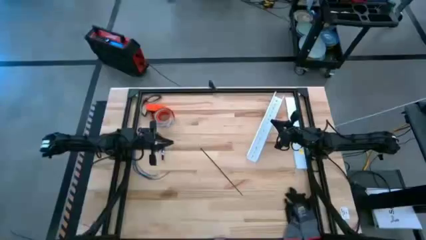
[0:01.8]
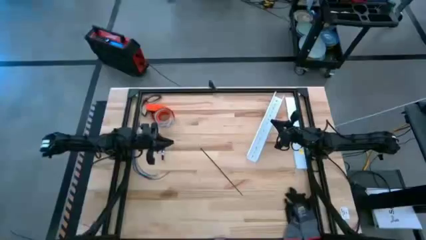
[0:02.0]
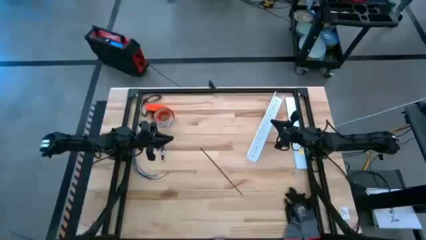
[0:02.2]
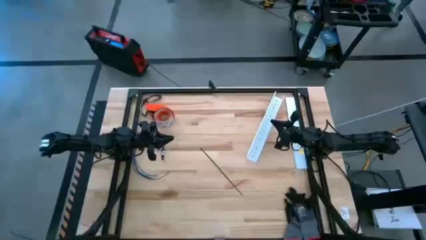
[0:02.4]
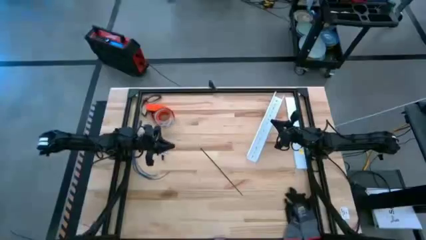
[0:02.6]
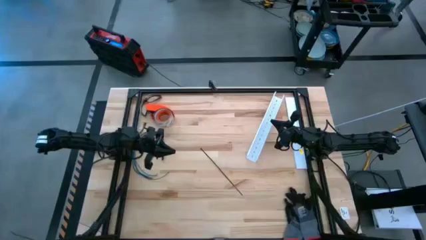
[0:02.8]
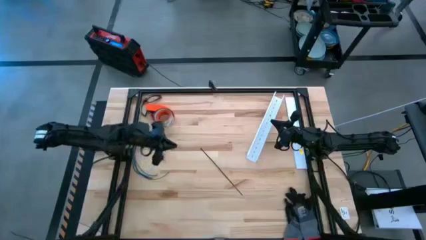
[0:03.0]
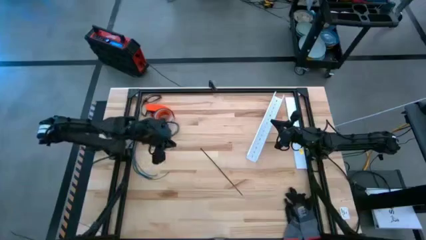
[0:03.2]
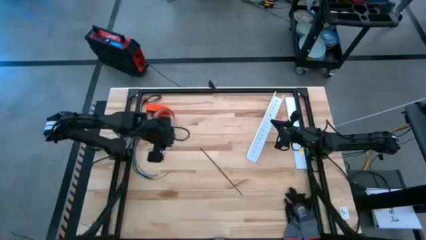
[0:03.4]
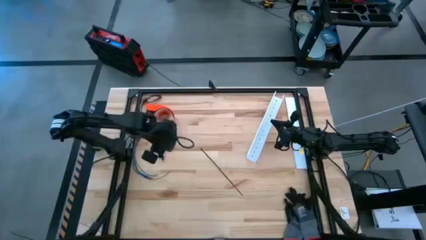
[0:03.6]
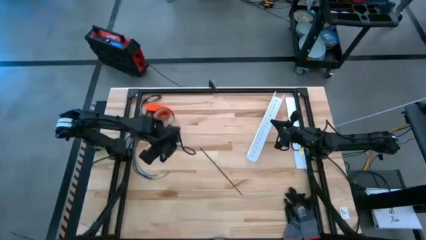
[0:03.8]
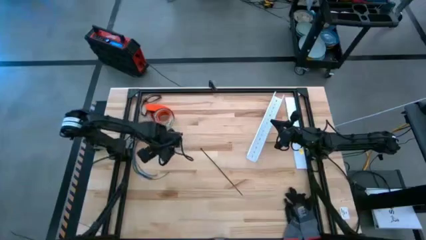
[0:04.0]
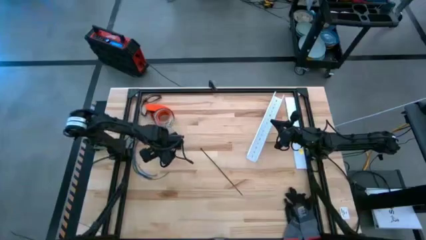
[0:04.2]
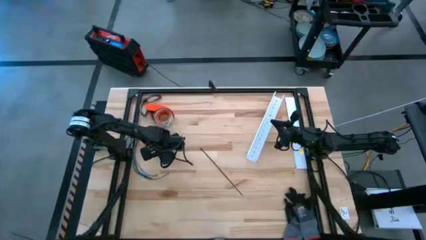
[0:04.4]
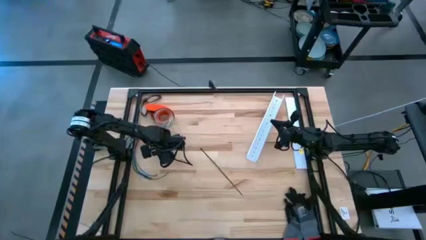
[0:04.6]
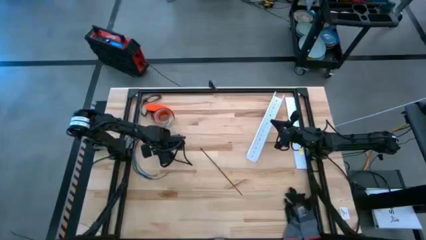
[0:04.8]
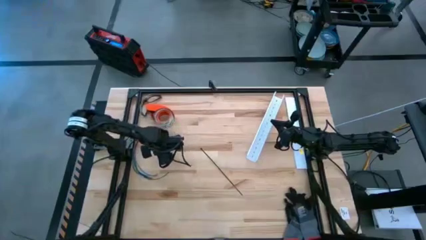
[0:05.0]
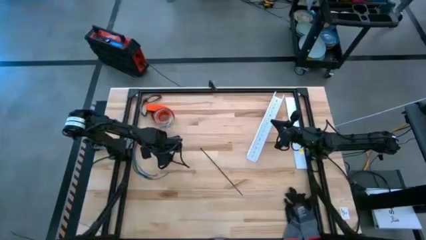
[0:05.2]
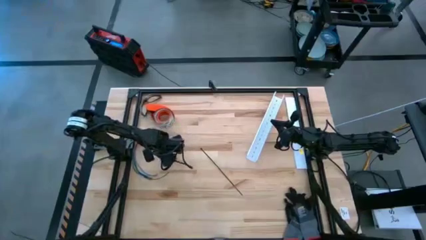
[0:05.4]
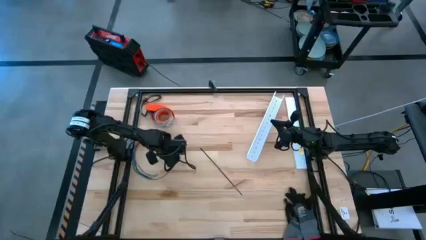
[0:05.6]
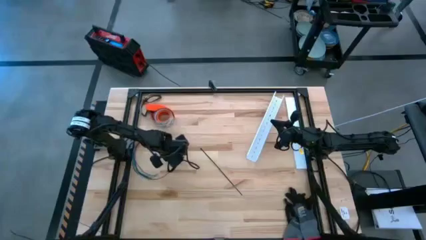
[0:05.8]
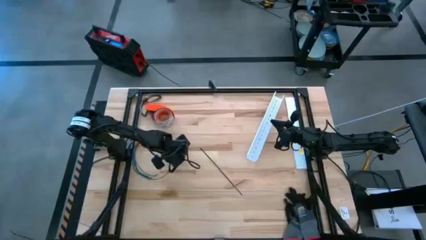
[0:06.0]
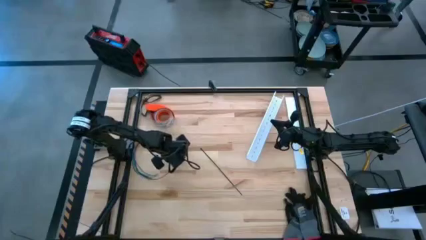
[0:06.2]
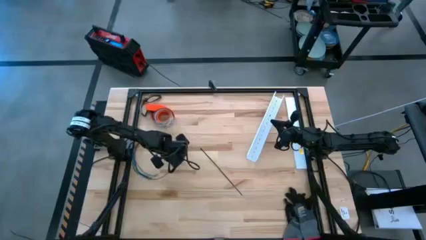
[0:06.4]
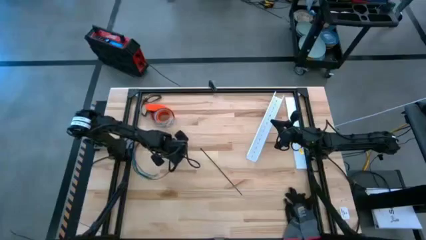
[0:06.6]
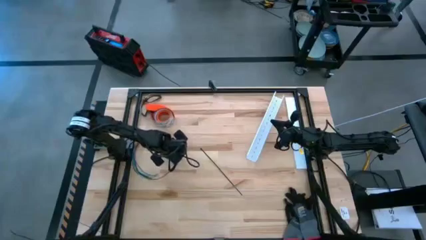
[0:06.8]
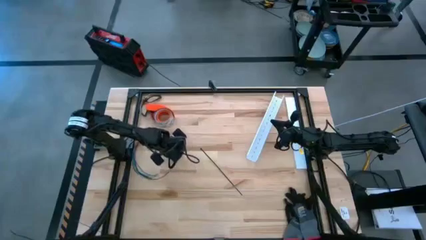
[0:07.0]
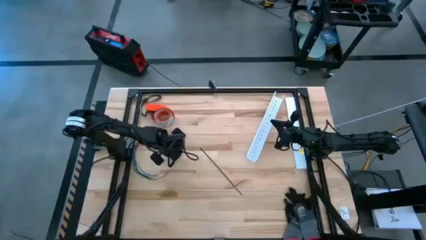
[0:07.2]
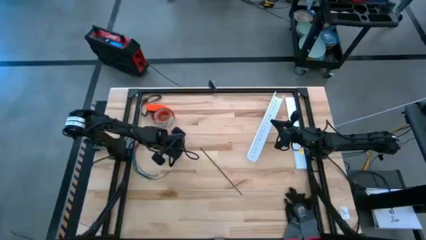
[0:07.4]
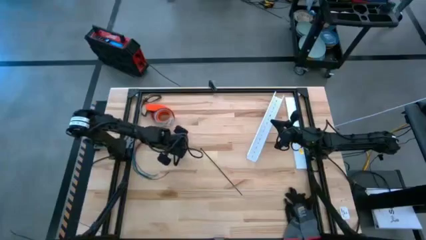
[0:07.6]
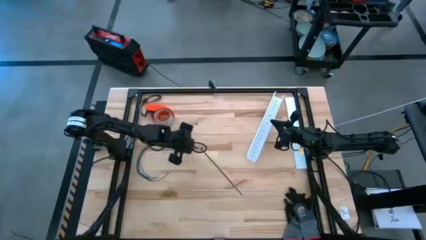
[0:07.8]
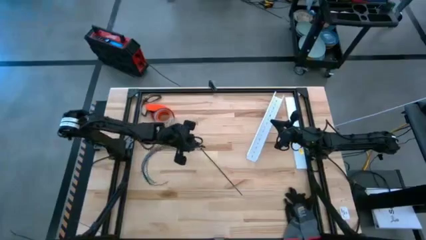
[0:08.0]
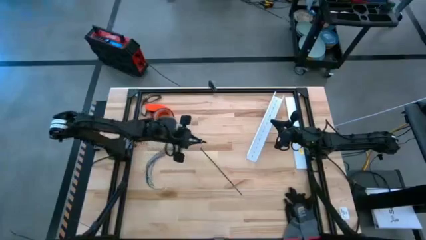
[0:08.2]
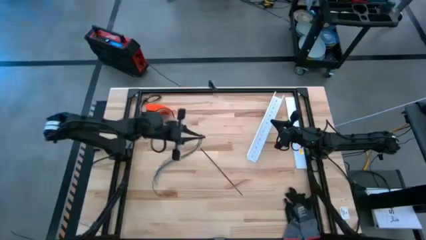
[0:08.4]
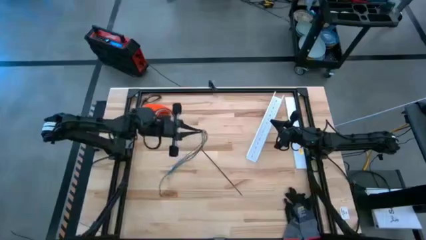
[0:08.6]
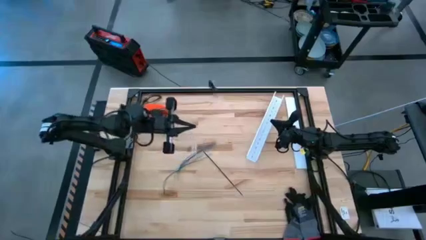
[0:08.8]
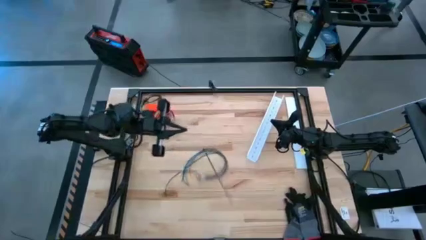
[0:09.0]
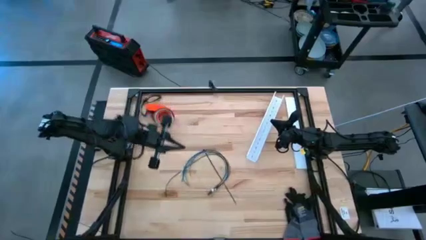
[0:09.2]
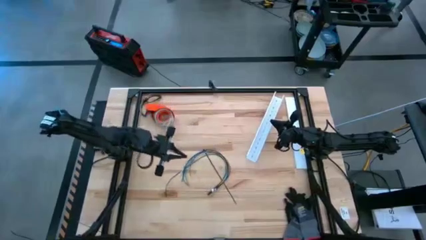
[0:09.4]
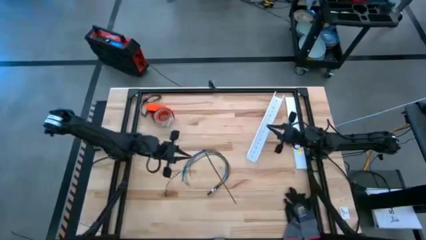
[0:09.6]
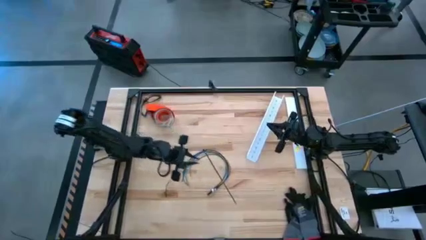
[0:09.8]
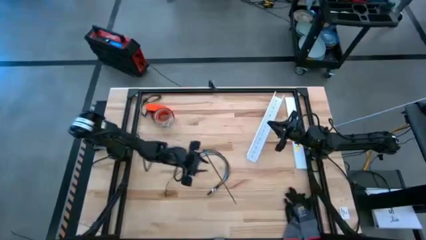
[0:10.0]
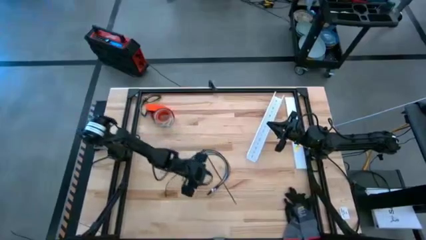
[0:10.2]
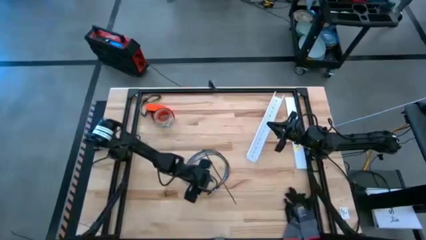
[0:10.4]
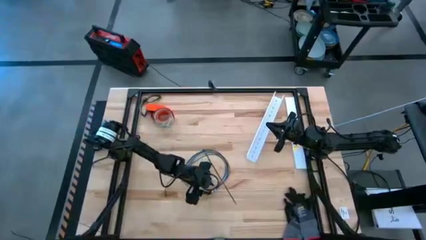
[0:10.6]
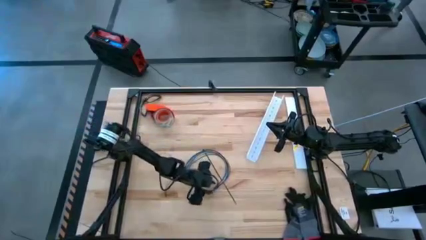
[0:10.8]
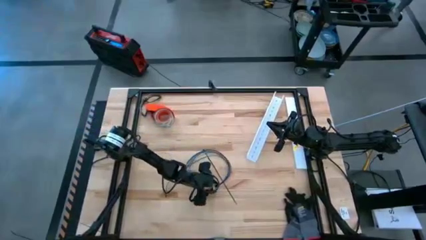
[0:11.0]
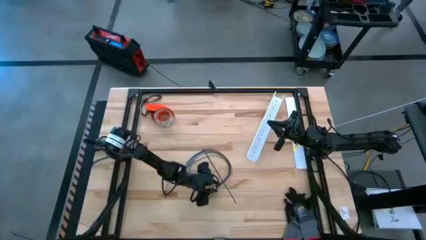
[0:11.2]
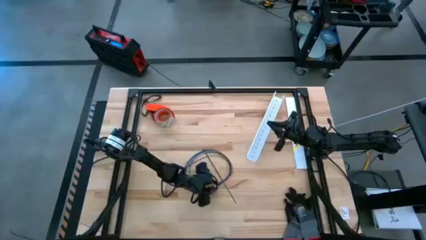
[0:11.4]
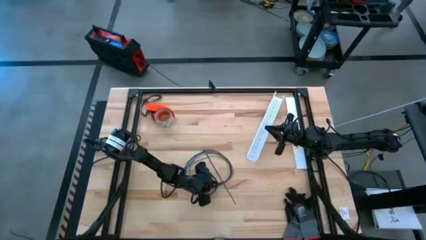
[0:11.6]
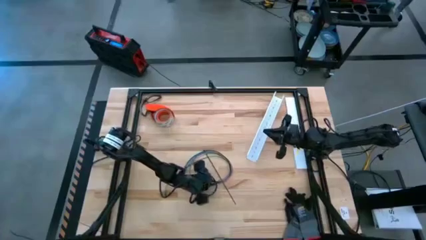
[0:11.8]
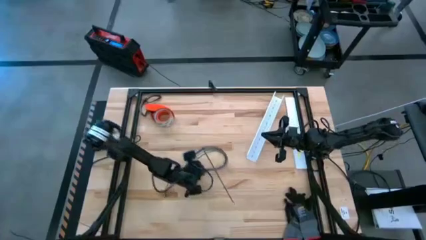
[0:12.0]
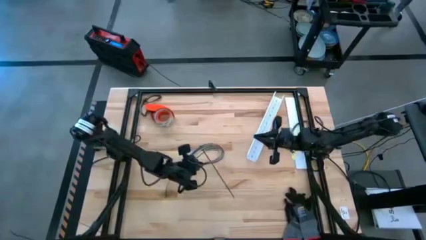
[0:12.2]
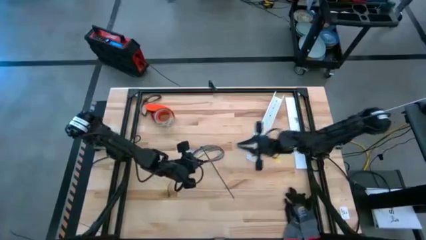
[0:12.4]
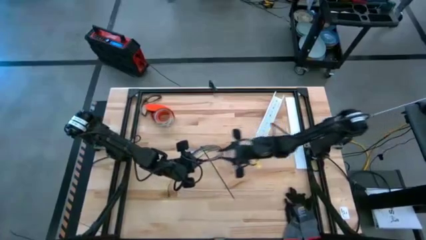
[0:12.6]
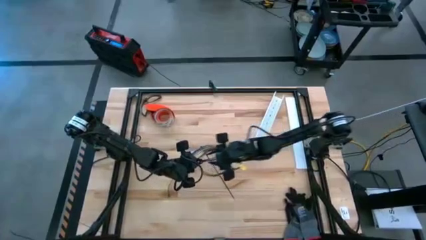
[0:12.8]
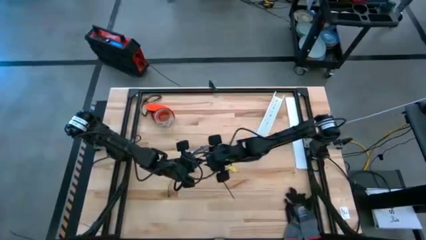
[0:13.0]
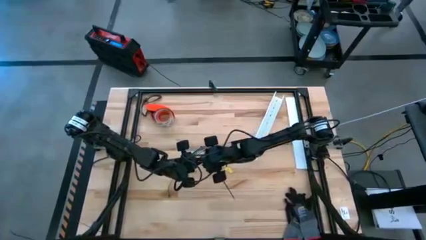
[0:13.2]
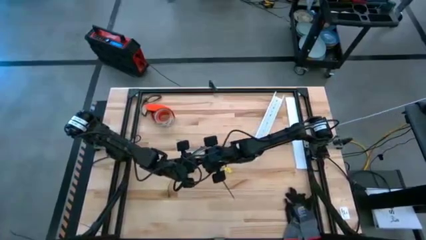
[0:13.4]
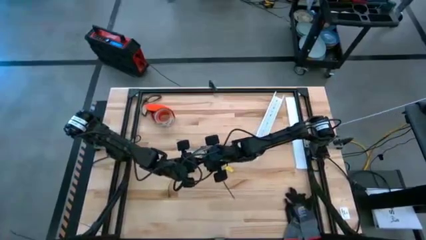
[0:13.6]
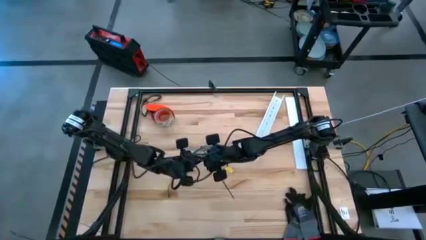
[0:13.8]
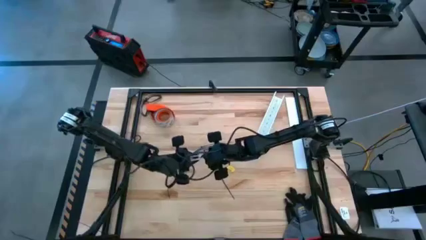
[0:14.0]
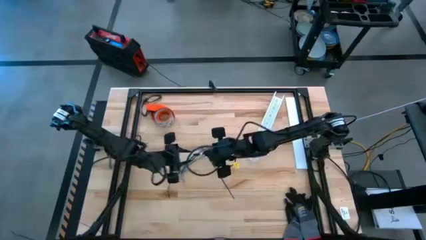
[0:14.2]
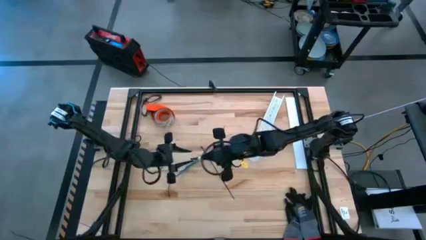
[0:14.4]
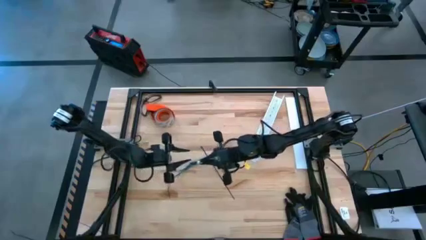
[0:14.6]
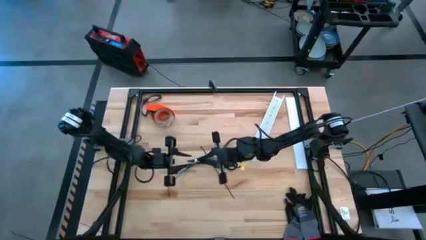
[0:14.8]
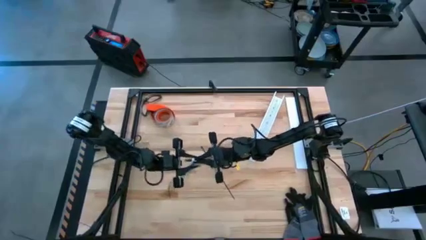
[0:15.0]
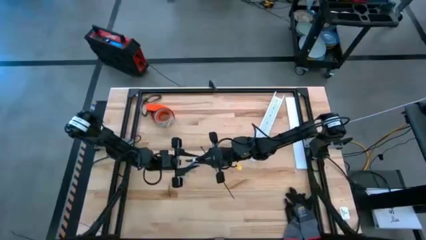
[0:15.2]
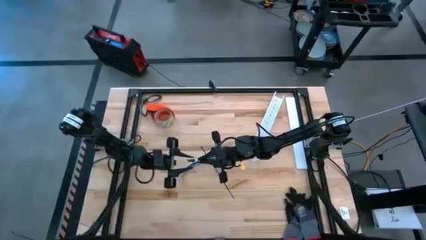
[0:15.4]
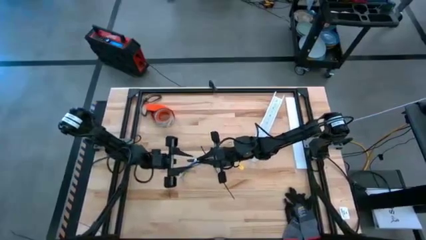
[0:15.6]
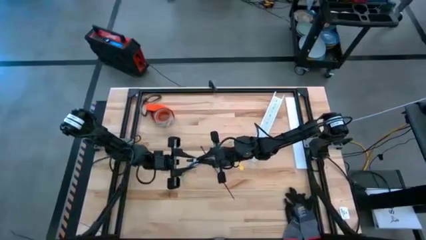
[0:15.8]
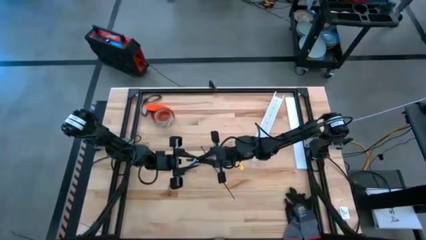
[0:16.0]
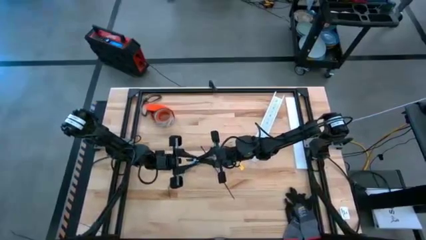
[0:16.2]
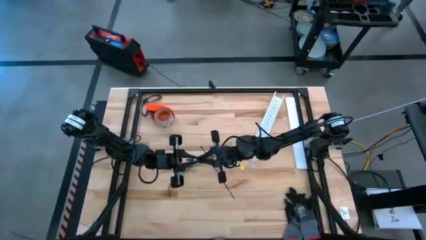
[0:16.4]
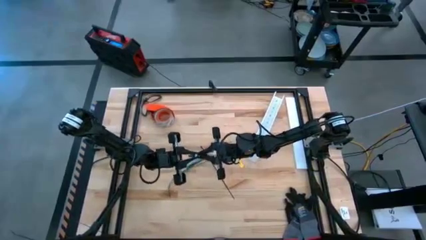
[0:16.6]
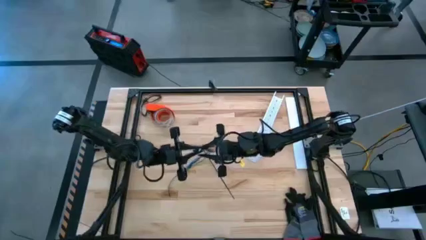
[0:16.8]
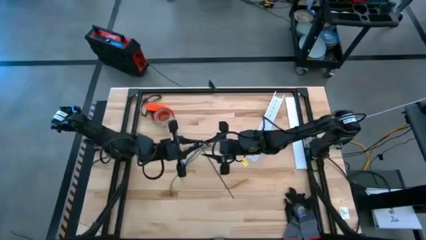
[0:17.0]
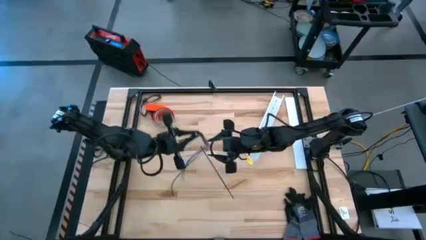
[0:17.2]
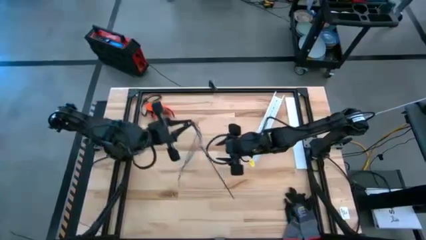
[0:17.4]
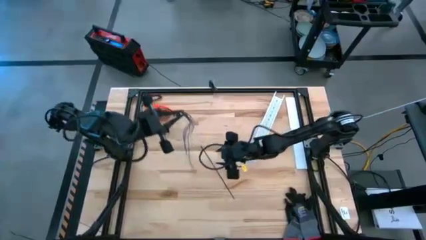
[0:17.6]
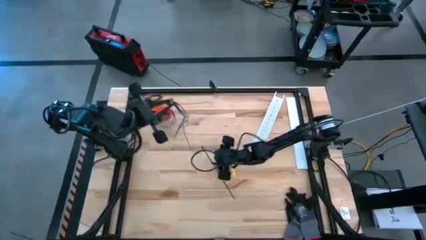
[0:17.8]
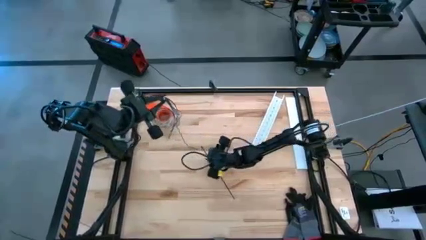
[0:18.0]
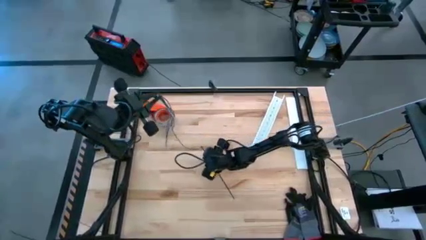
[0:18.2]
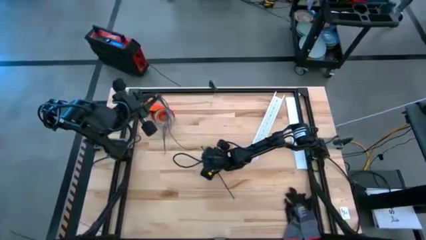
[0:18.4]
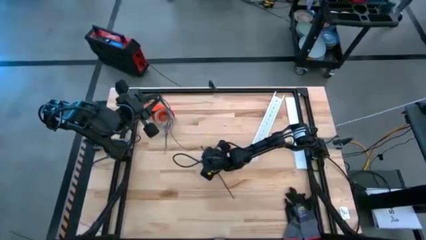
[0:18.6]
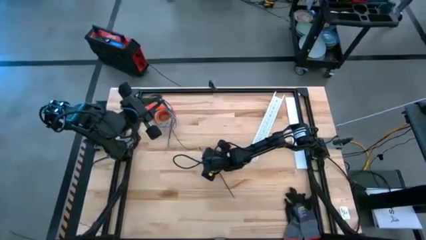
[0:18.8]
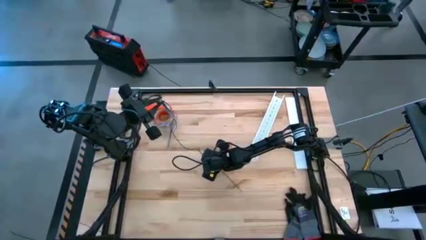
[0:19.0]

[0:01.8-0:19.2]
Task: Ziptie cables
Wrap the cables together using a black zip tie
